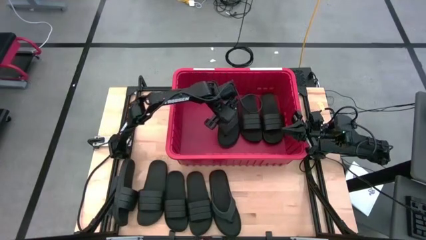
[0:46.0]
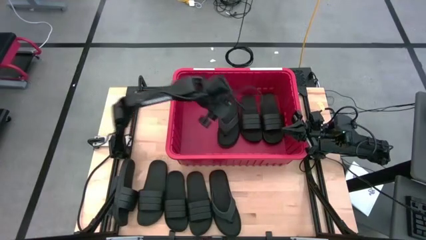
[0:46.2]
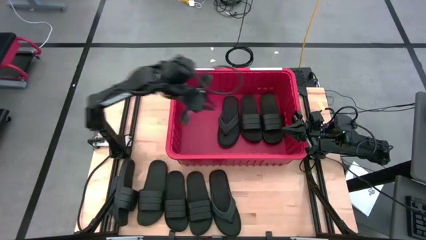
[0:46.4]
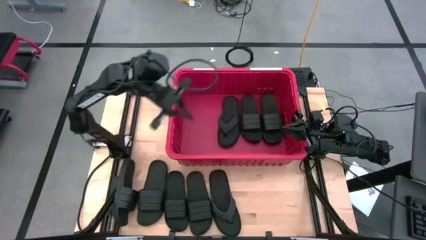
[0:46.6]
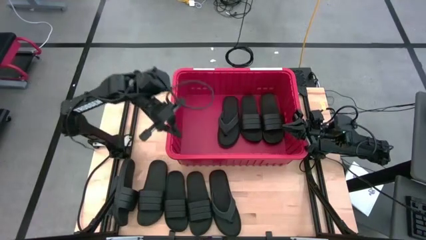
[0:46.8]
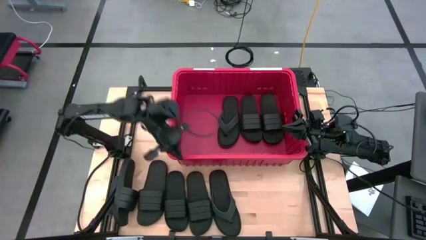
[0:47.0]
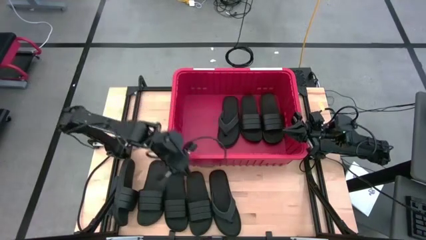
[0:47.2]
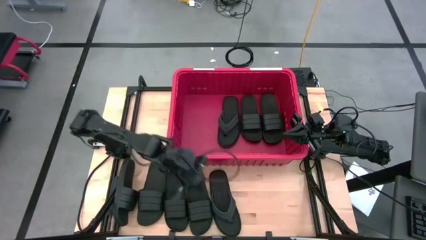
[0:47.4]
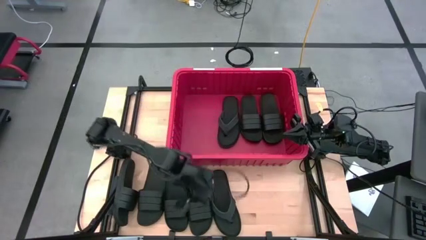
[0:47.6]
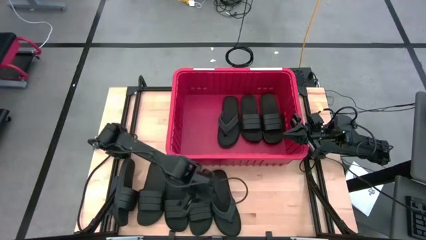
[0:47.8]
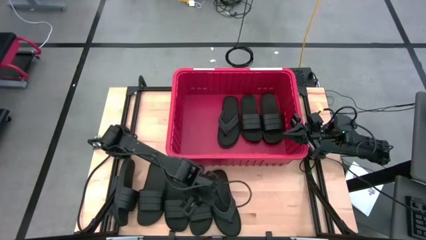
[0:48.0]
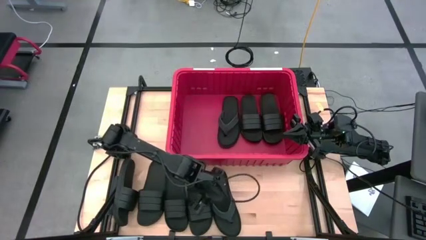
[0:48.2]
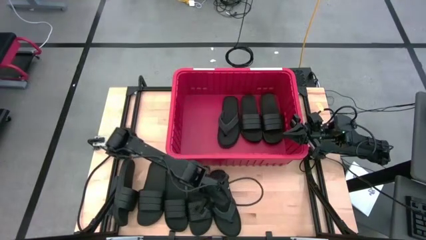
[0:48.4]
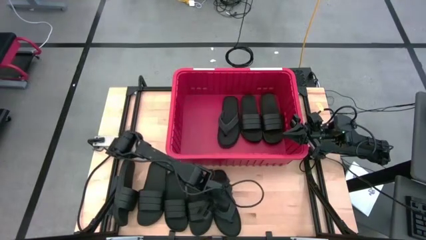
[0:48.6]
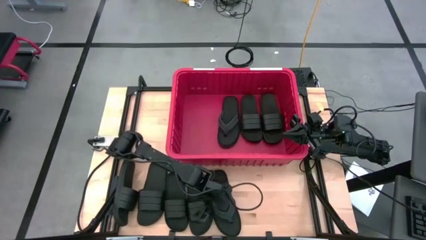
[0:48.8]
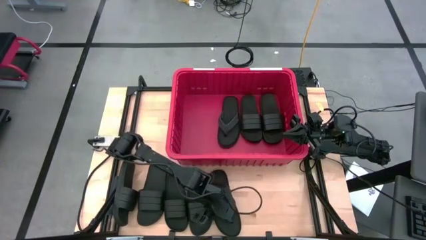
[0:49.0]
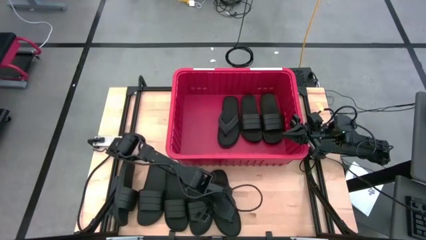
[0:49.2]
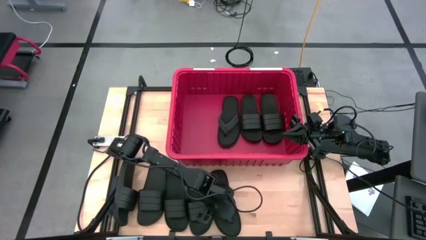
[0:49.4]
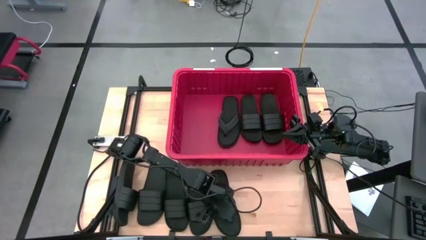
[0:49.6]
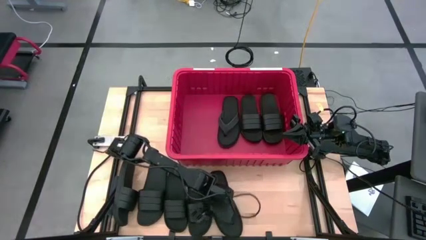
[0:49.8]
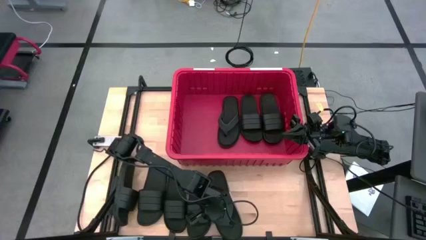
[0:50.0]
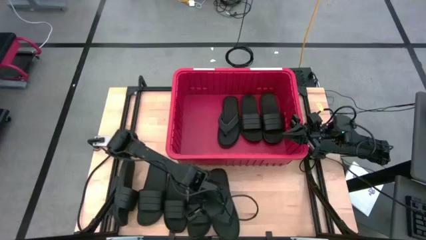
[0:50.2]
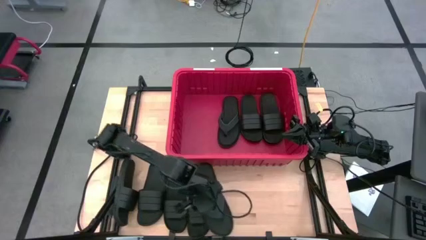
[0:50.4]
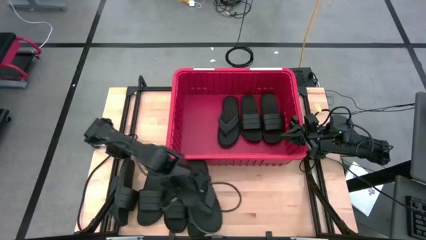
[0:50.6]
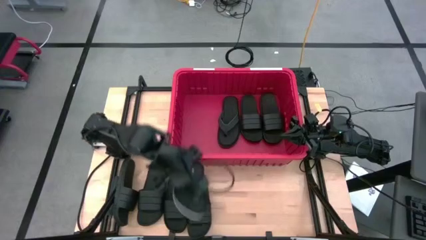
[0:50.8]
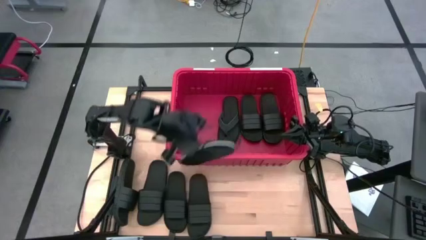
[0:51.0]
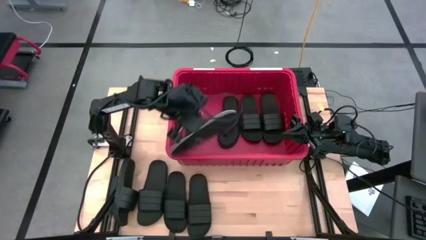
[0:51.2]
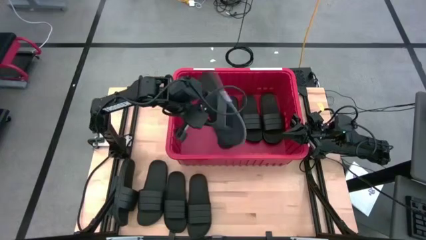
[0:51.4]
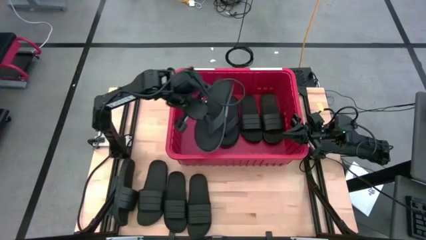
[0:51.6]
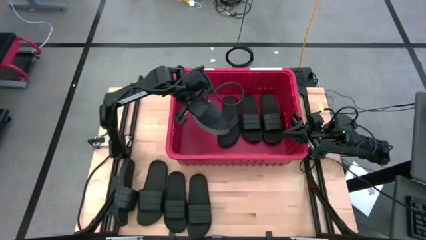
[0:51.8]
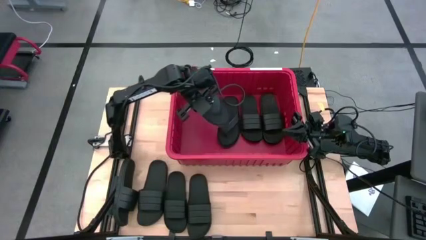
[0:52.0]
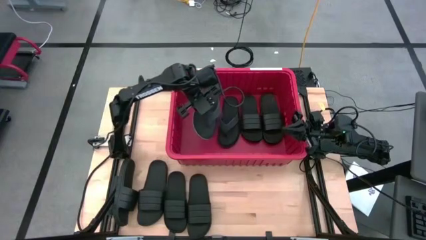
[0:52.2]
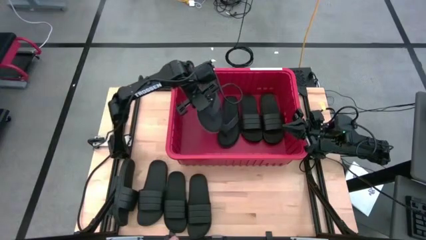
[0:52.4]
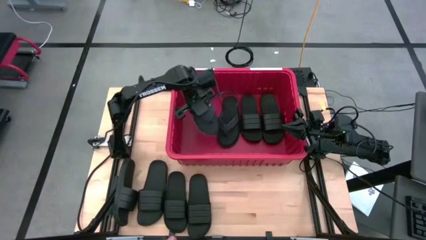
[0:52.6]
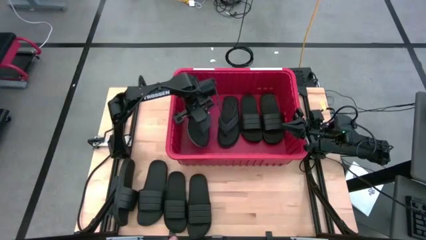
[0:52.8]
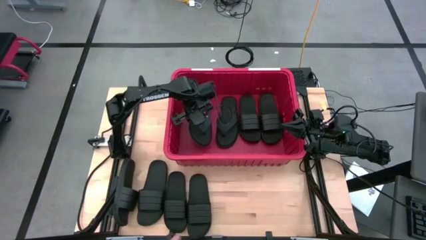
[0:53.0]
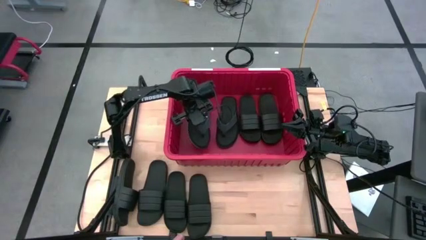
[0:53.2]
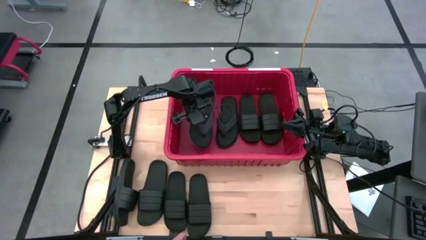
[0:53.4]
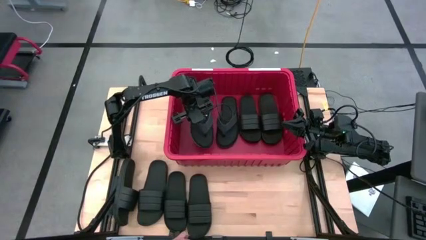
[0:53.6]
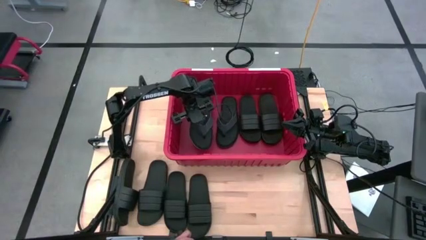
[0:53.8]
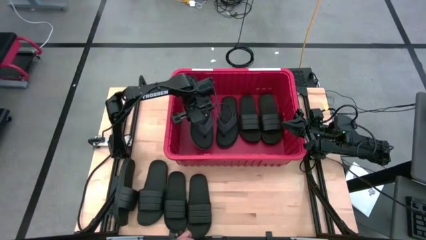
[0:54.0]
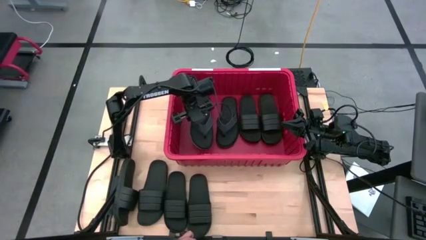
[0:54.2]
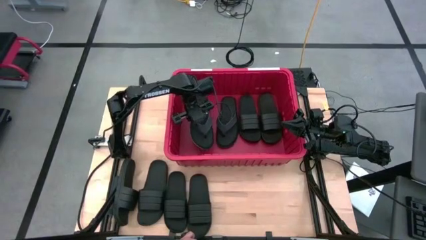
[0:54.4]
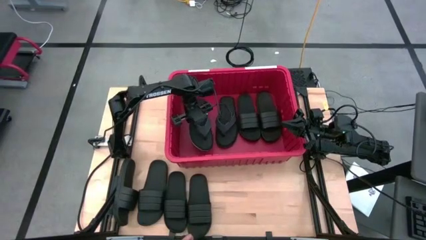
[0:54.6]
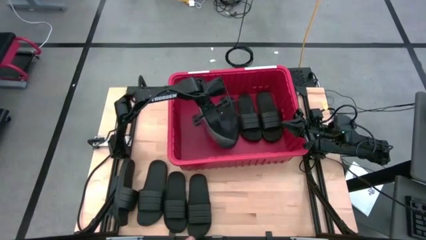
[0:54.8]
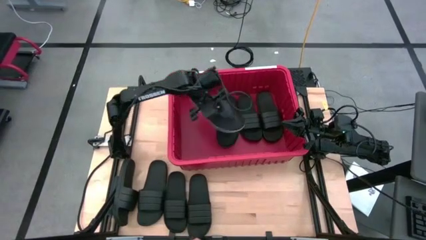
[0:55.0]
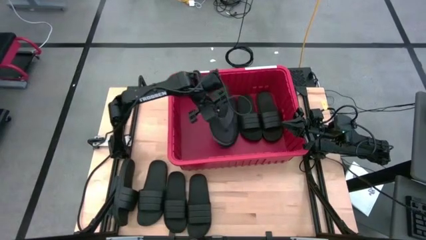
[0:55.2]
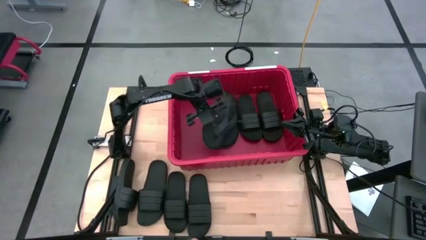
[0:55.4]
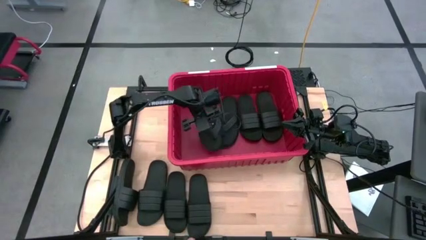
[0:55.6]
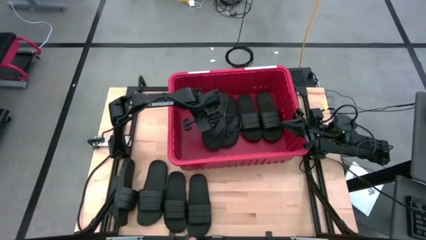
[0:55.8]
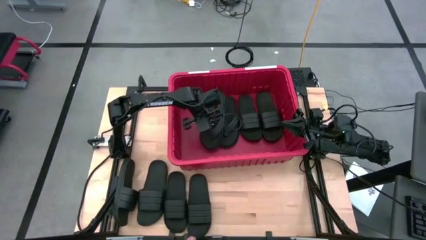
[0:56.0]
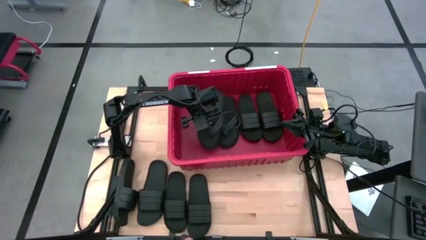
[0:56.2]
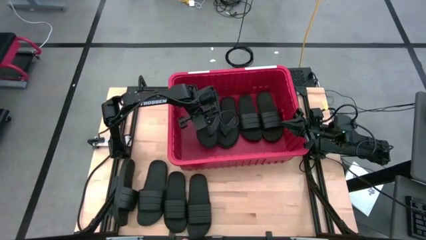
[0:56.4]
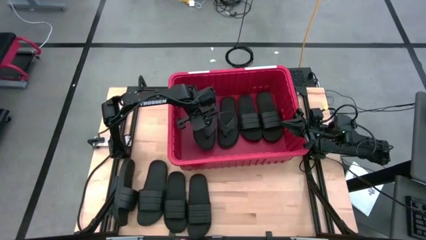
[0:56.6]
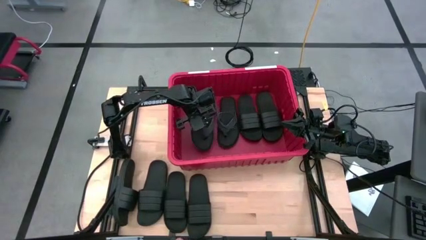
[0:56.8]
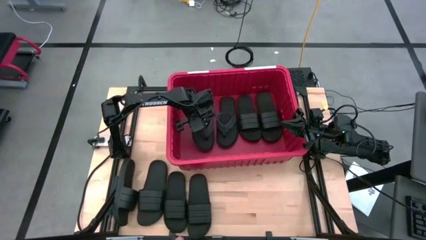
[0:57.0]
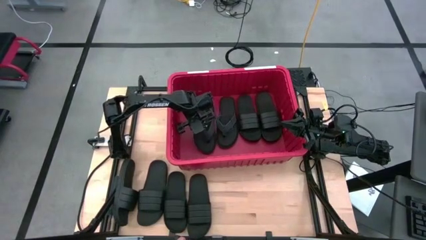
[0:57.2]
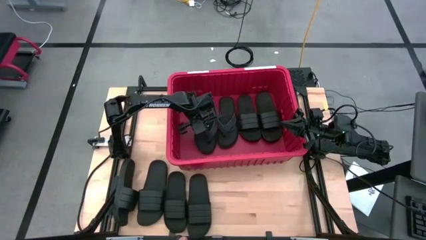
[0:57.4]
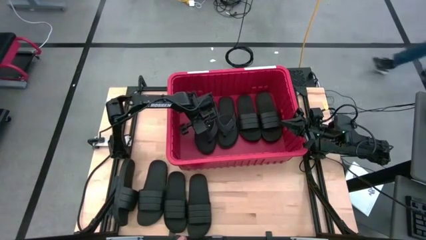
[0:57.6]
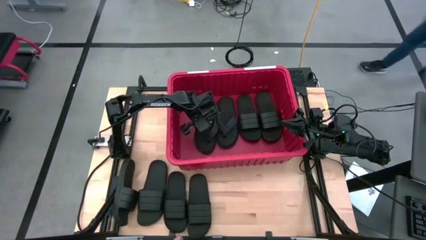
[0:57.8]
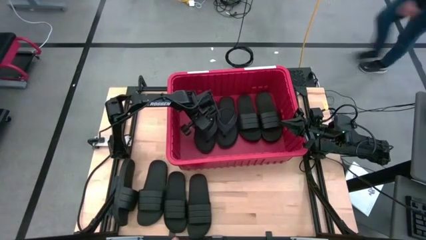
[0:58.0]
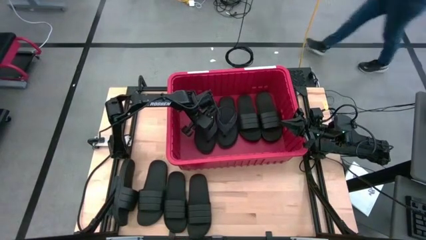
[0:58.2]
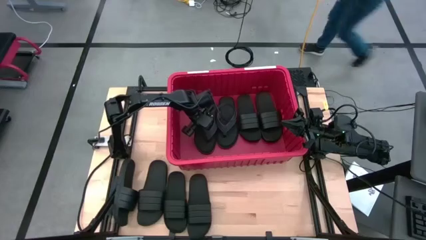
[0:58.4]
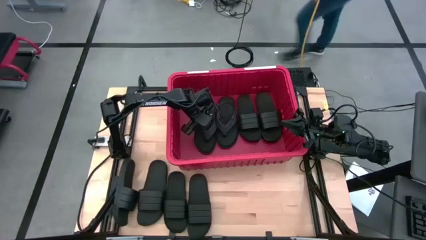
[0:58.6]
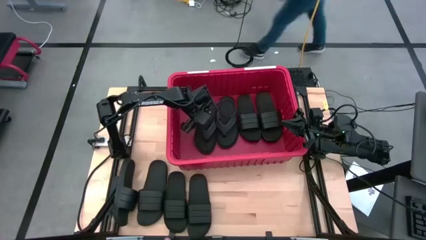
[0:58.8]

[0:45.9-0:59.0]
Task: Pick and place slides into bin
Put the black slipper into the red bin

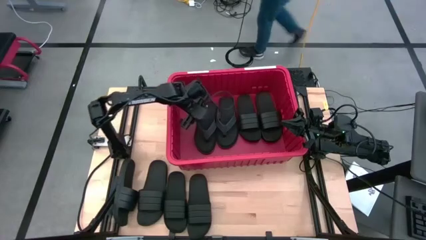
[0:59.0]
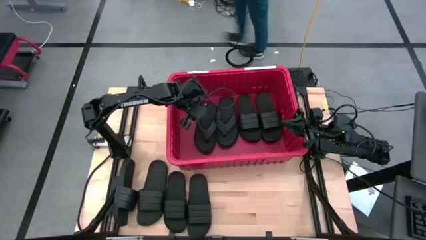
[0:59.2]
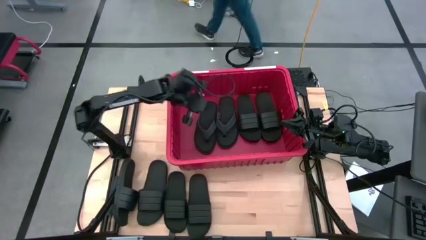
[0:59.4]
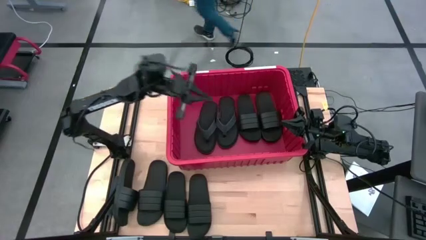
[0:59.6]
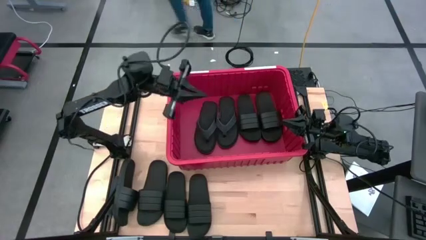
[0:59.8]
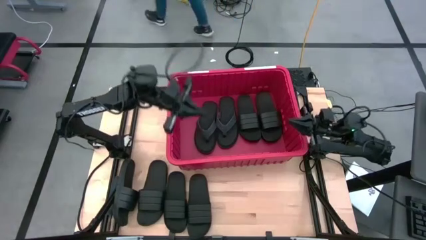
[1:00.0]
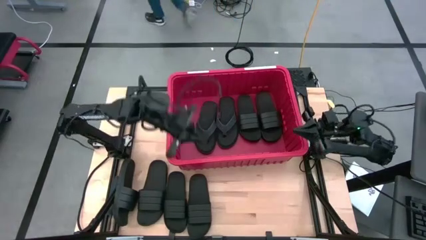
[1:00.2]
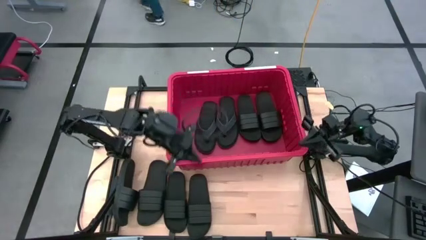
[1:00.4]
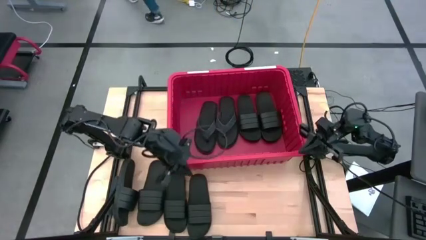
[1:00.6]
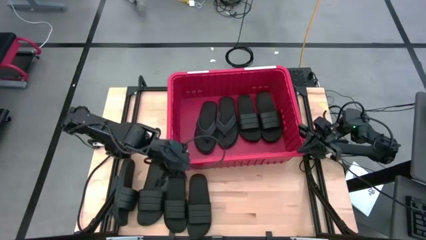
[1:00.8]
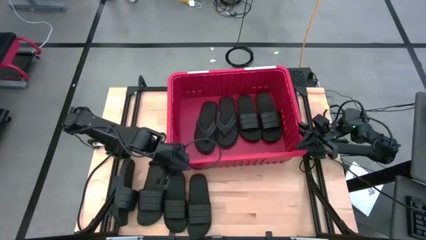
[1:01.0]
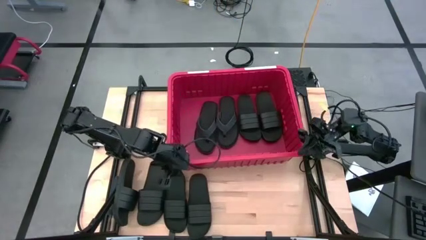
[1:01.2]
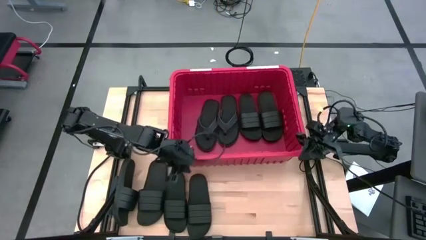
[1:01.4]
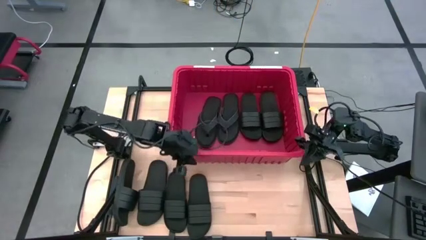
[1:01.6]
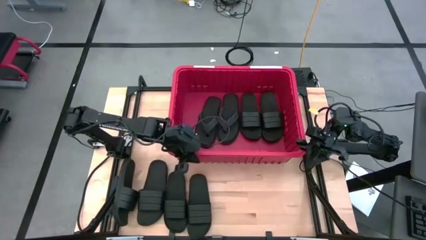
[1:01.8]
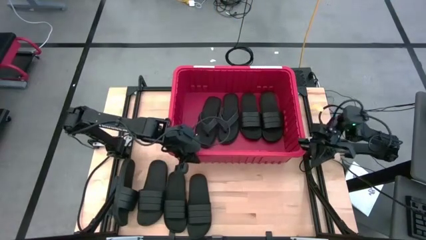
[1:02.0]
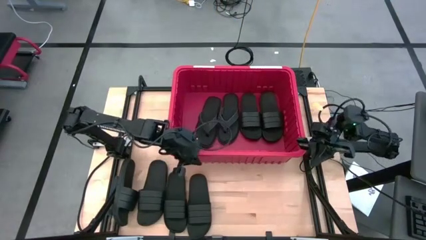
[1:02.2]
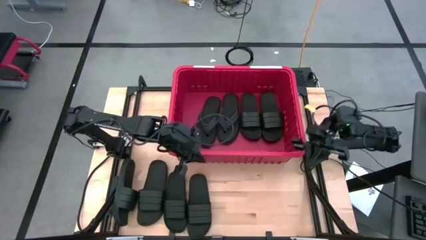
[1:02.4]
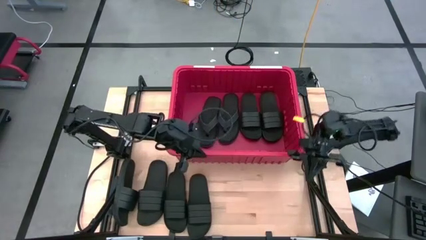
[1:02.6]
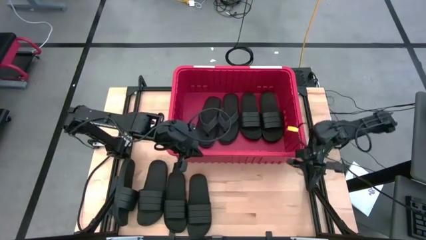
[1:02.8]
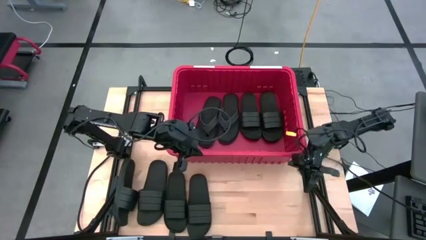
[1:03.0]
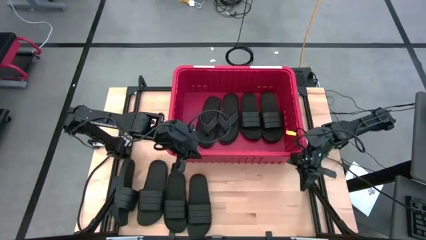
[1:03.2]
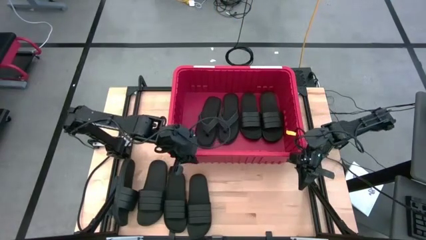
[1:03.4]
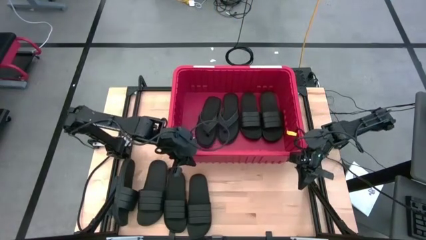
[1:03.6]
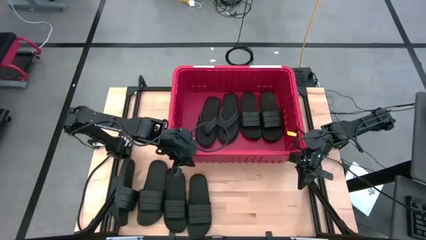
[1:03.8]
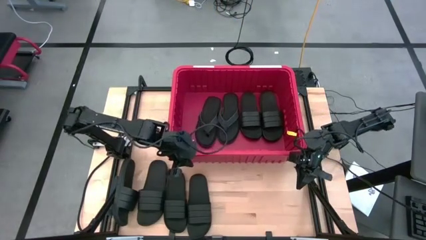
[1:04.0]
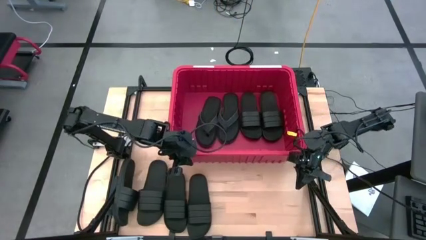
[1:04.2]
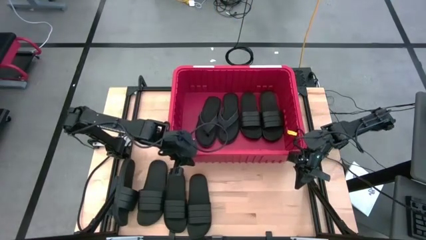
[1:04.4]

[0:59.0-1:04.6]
Adjust the red bin
